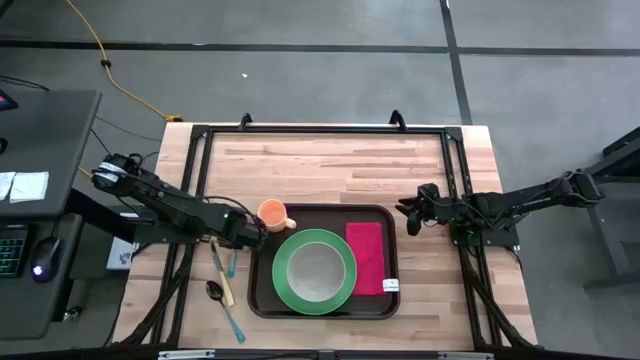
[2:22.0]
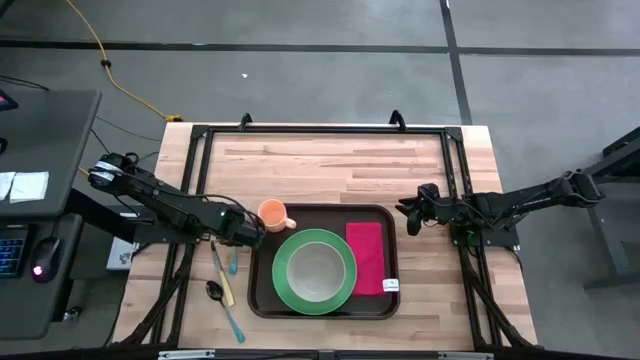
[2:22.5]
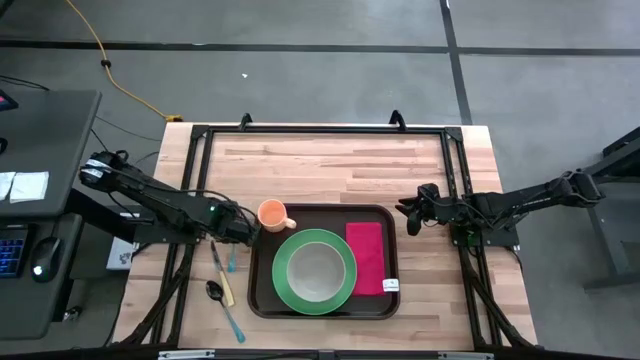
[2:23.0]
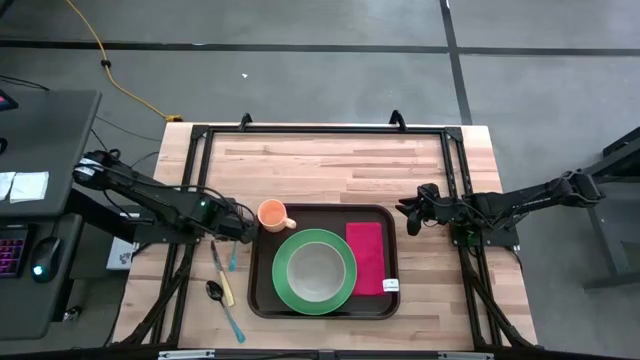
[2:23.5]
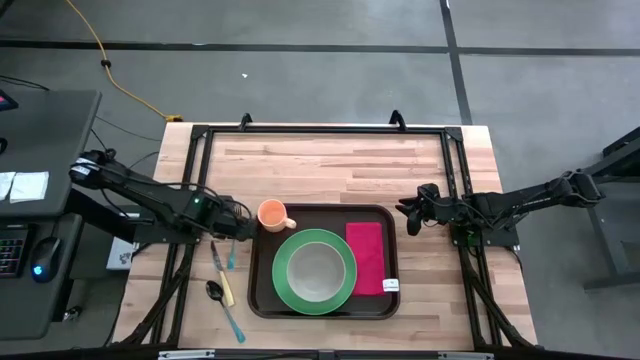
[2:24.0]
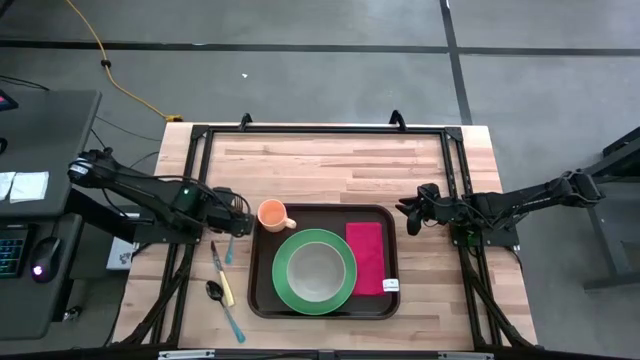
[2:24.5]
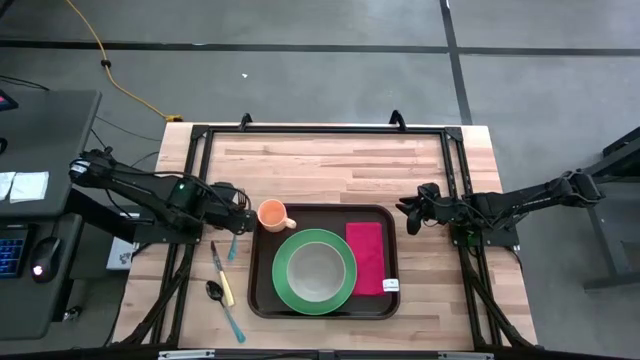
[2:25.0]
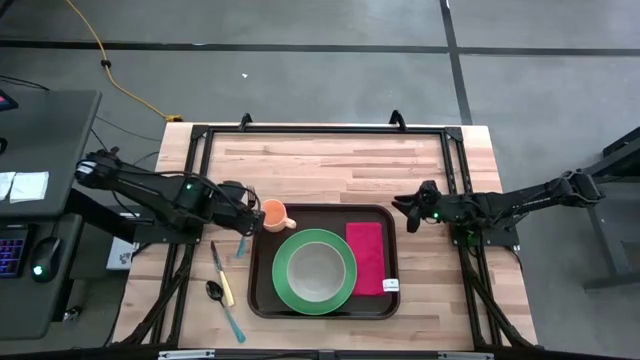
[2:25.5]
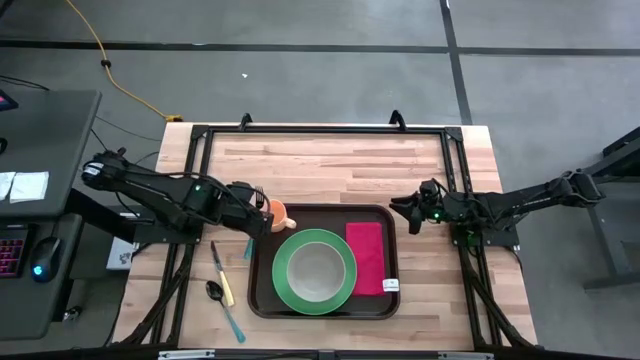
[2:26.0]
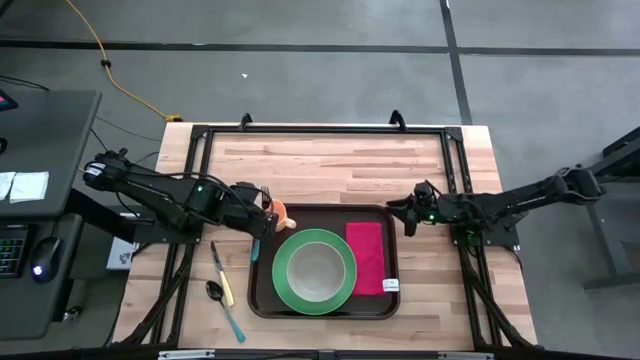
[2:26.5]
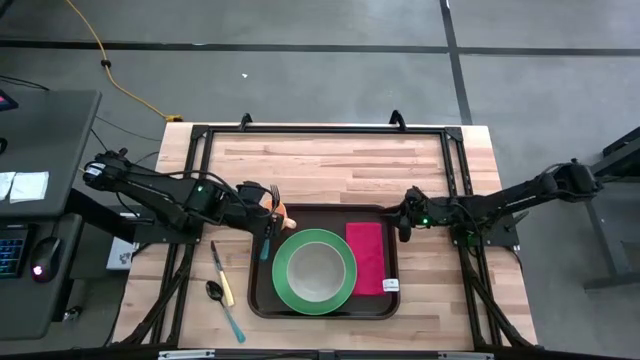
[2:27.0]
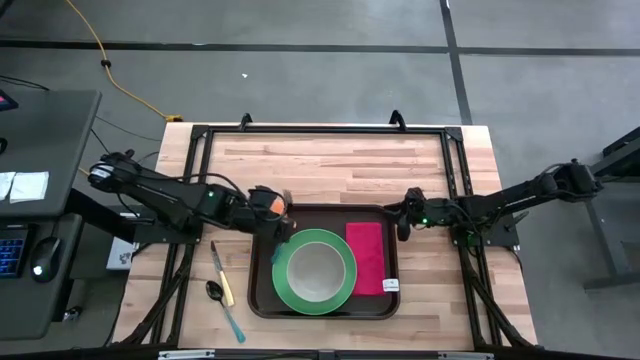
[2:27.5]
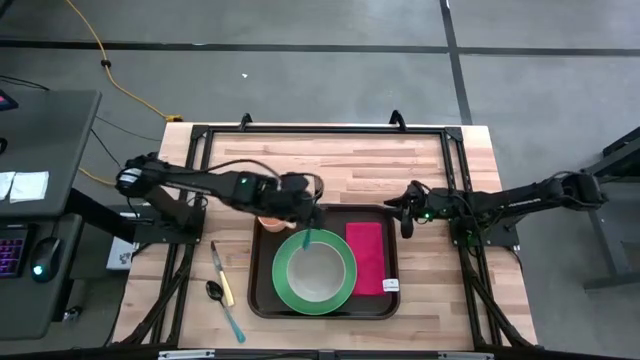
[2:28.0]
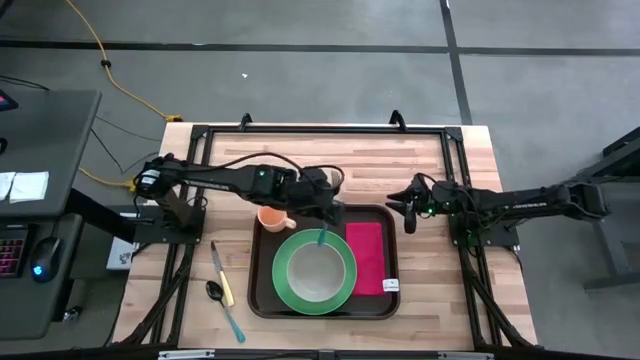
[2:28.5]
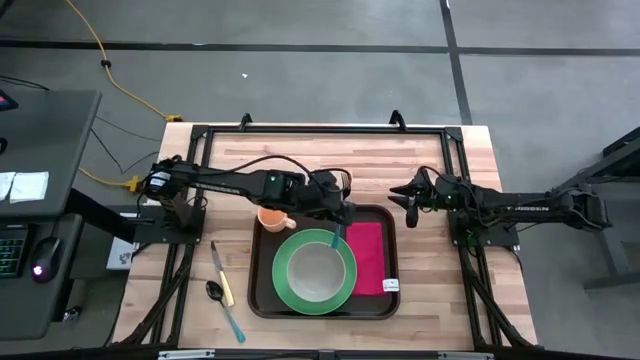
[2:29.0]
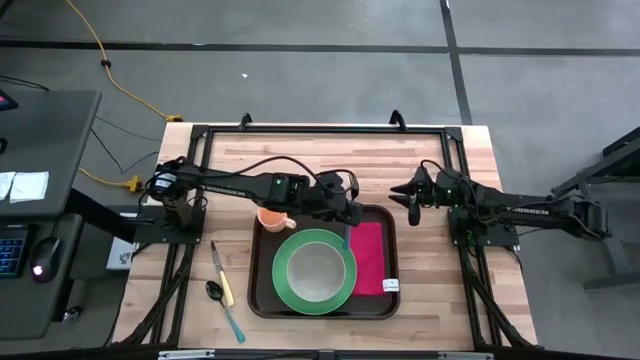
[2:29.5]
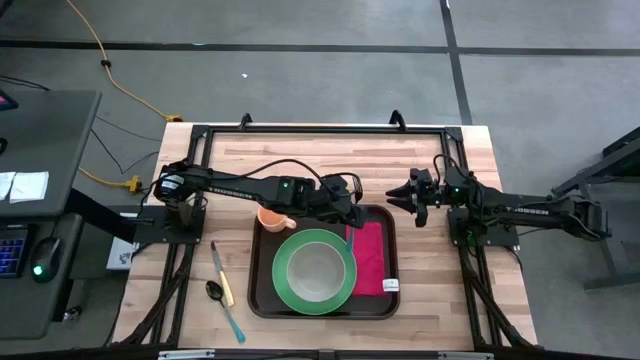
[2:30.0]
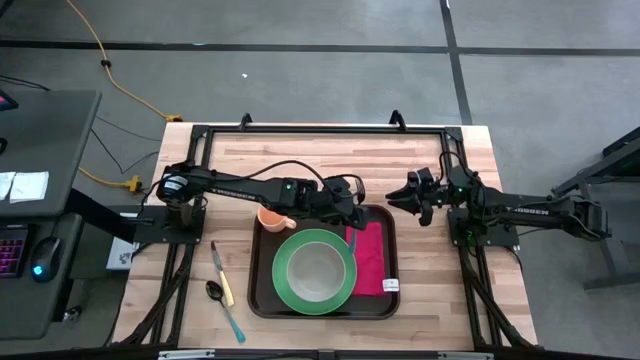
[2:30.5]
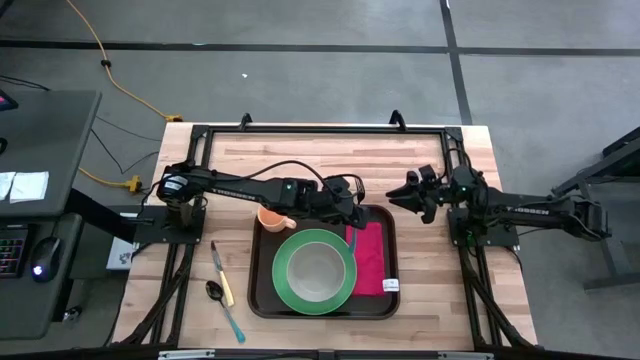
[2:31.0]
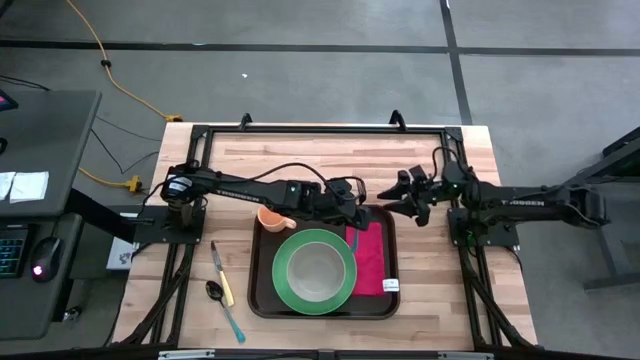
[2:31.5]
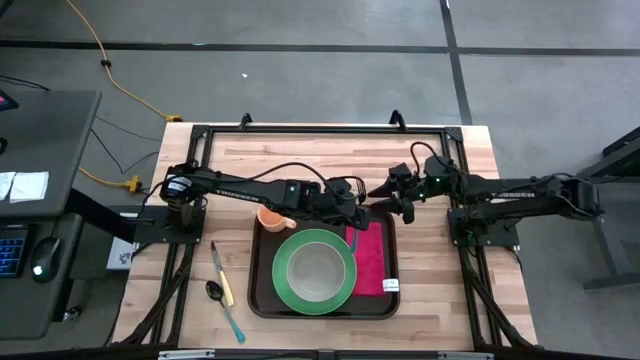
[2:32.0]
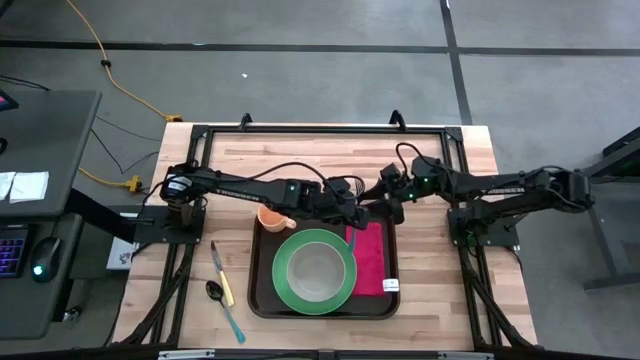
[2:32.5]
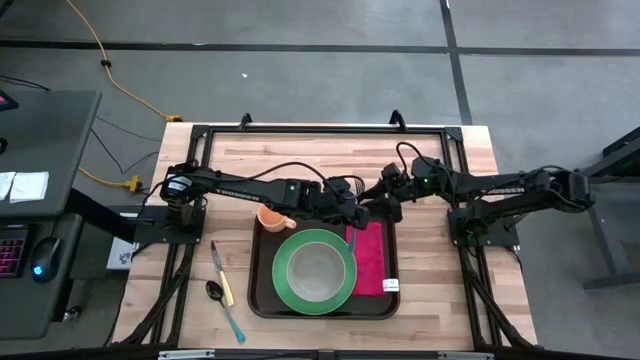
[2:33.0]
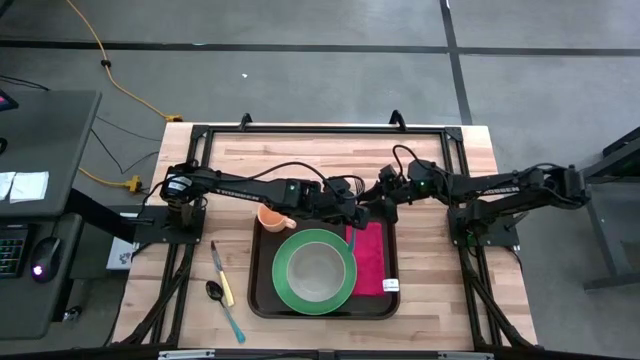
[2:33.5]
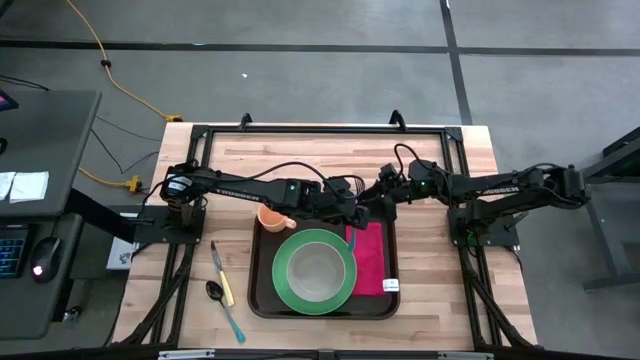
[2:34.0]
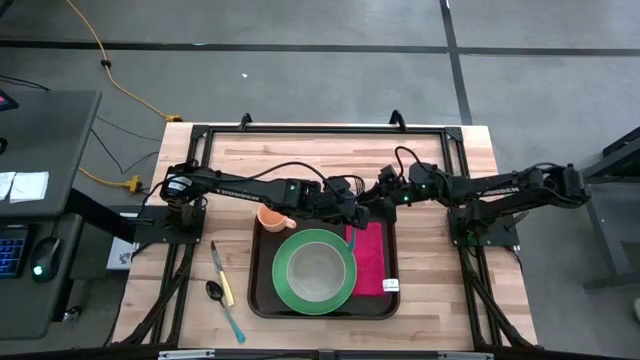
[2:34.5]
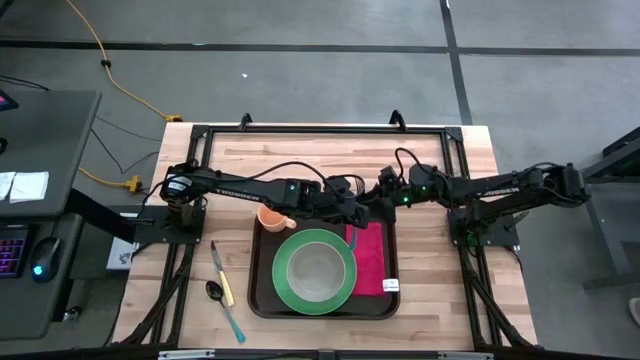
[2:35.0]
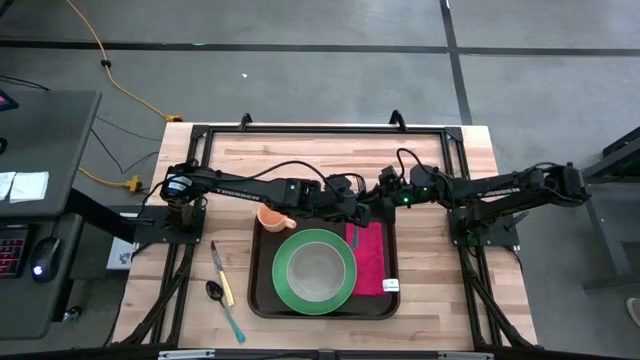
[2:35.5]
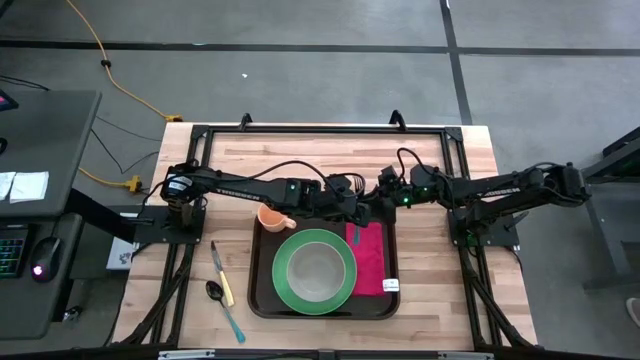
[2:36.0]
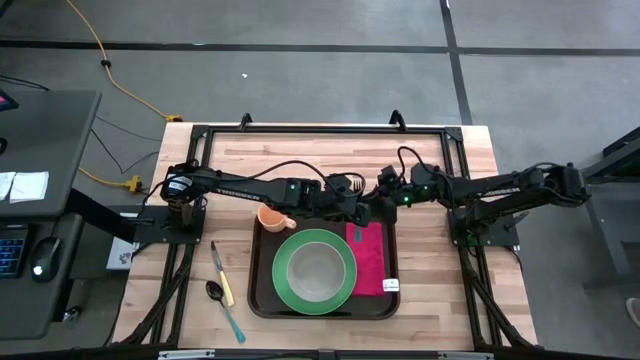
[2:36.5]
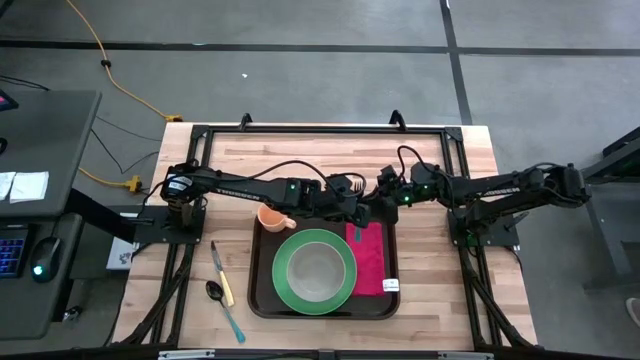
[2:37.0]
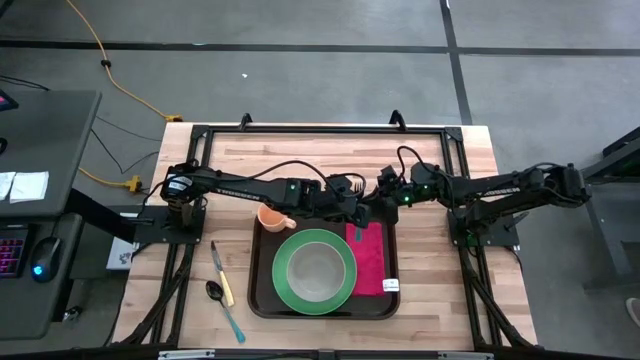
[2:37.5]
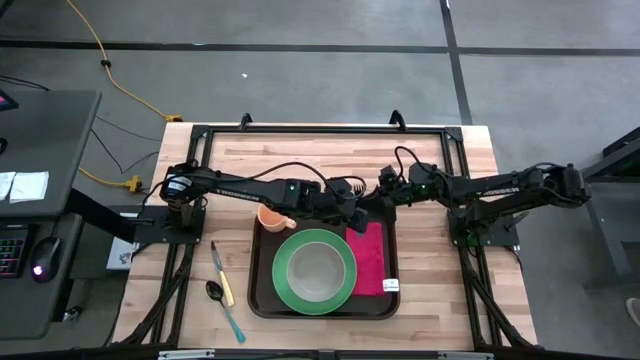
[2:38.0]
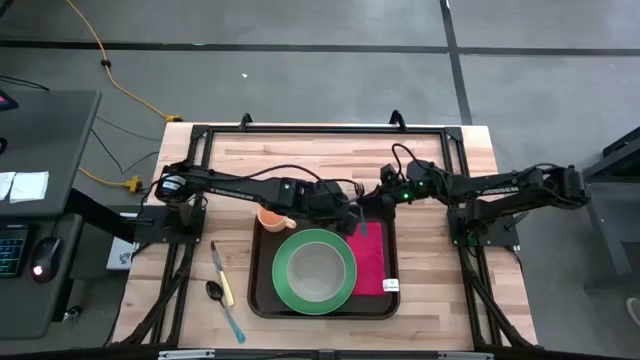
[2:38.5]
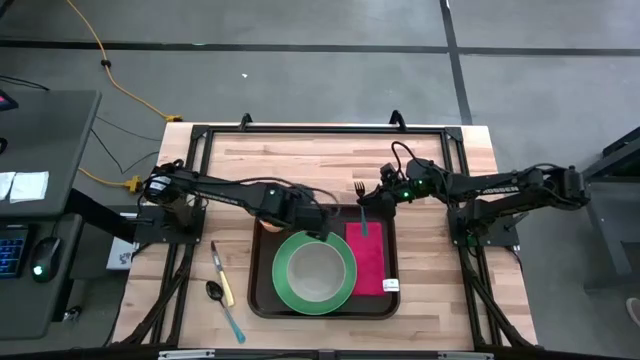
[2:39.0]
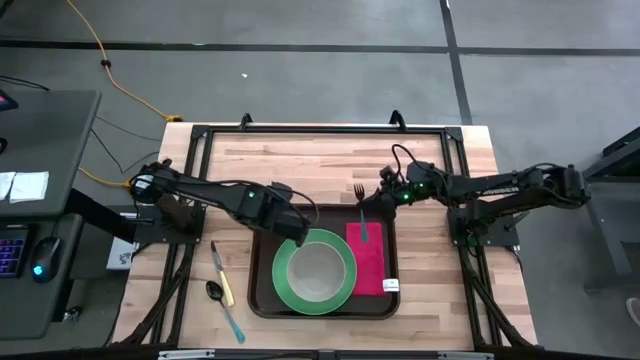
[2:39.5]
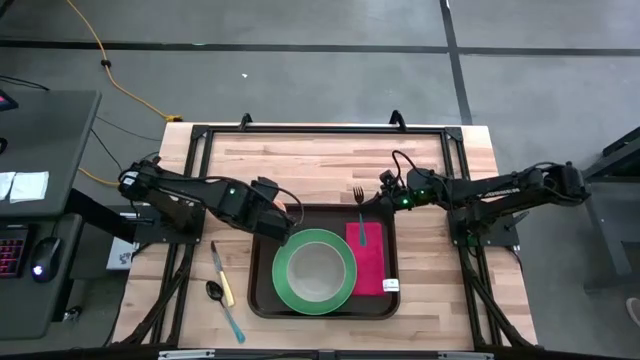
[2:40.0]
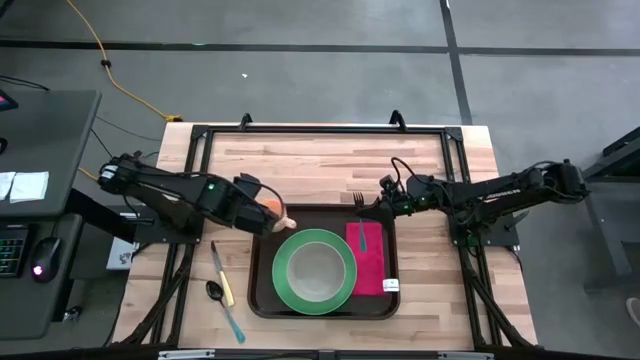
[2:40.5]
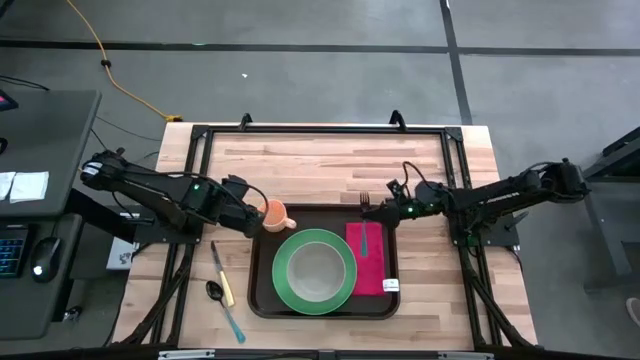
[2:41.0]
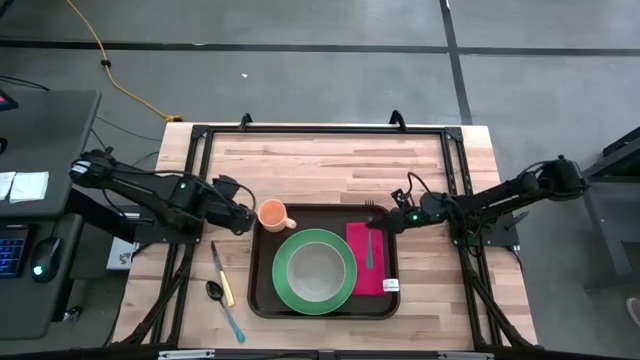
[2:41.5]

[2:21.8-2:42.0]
Task: Set up tray
Put the blue fork on the red table napkin

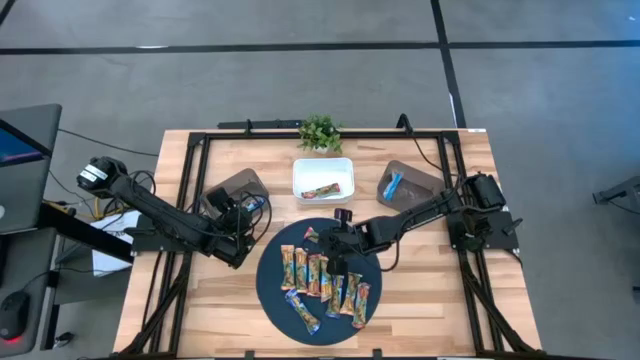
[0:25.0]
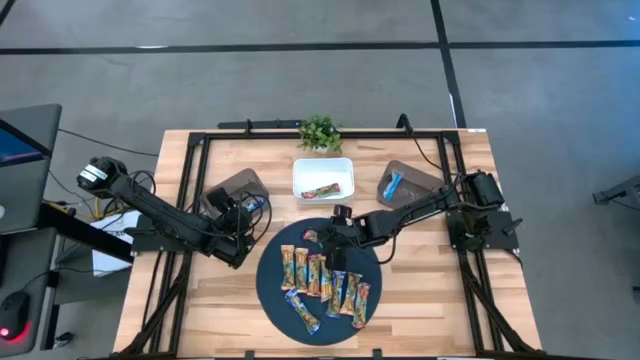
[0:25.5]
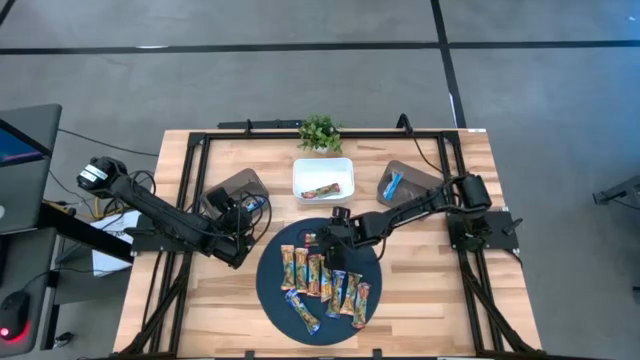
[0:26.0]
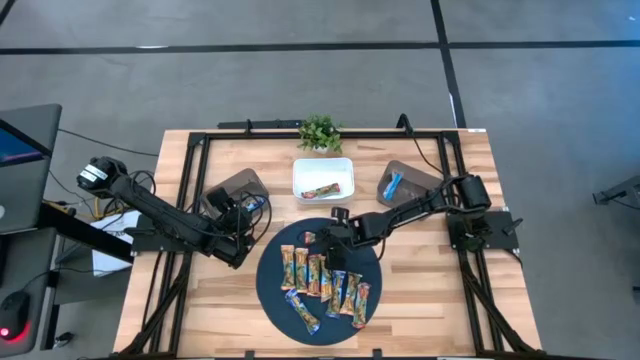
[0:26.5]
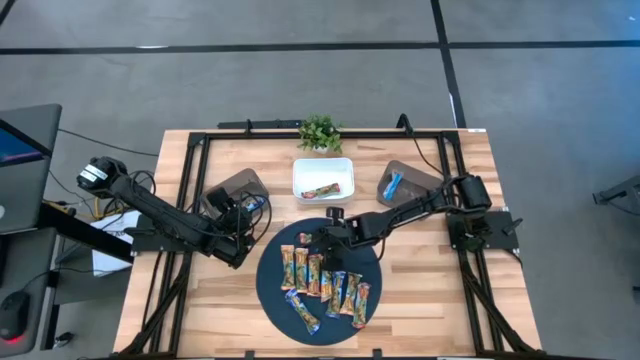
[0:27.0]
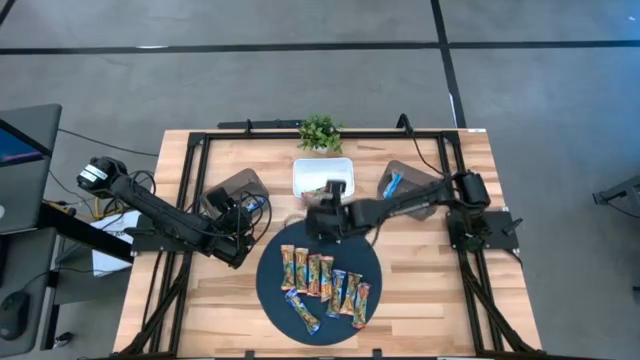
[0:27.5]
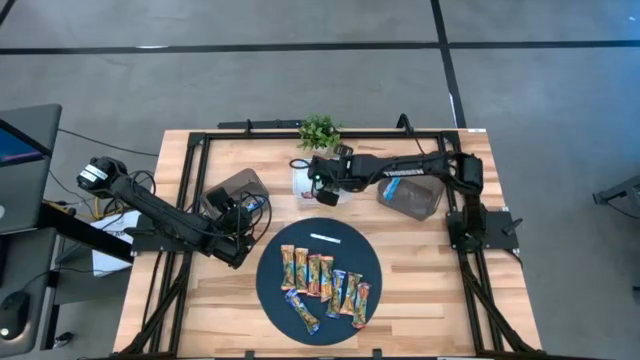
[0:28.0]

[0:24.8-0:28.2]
Task: Pick and place Granola Bars by type
Put the red granola bar into the white bin
